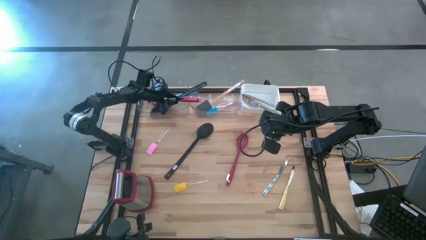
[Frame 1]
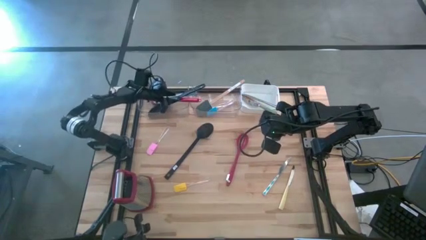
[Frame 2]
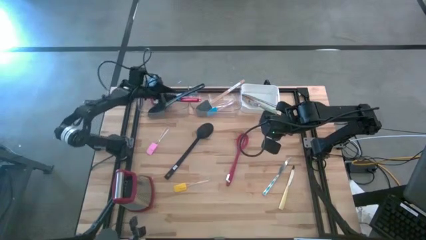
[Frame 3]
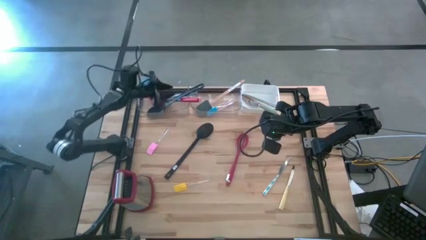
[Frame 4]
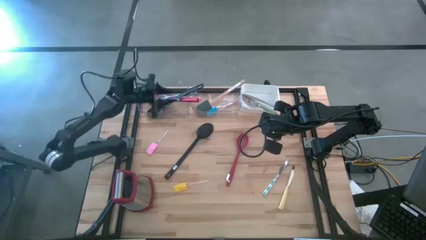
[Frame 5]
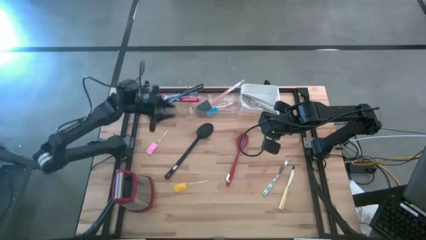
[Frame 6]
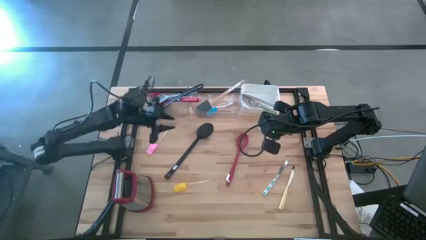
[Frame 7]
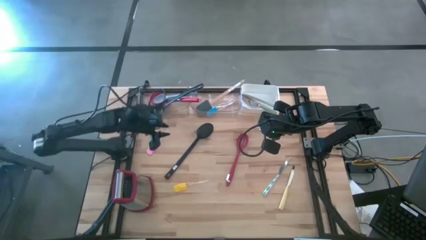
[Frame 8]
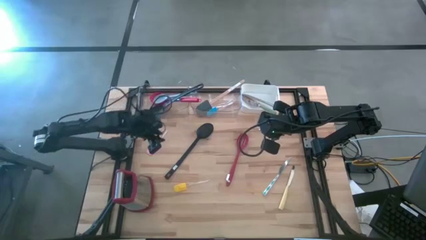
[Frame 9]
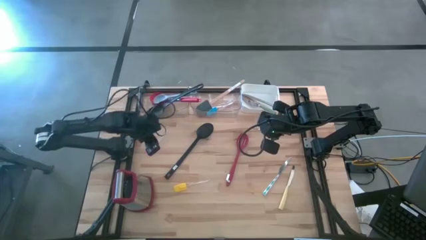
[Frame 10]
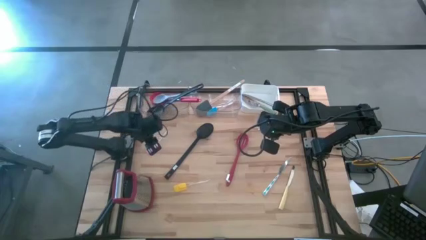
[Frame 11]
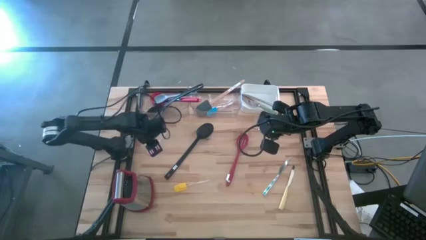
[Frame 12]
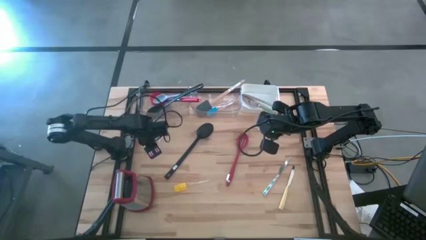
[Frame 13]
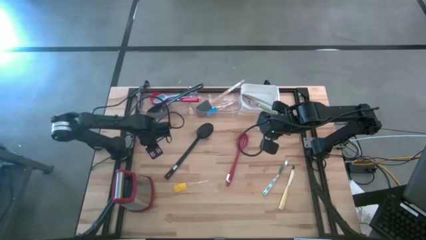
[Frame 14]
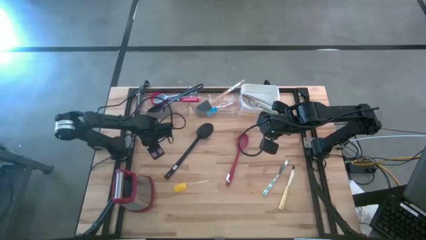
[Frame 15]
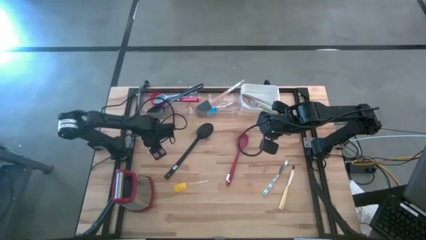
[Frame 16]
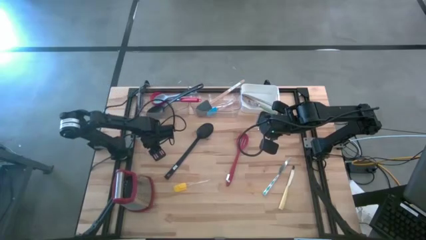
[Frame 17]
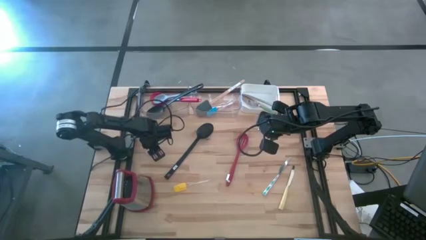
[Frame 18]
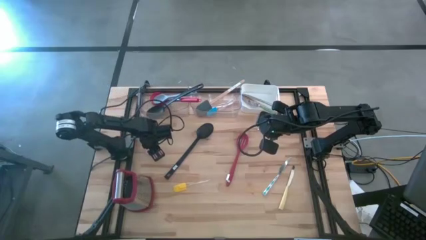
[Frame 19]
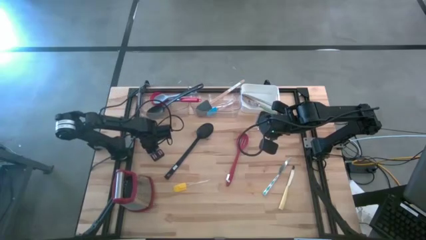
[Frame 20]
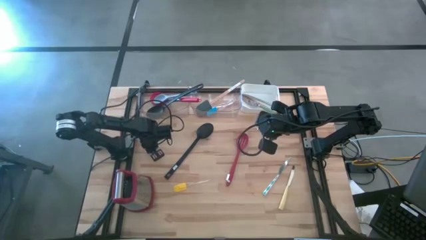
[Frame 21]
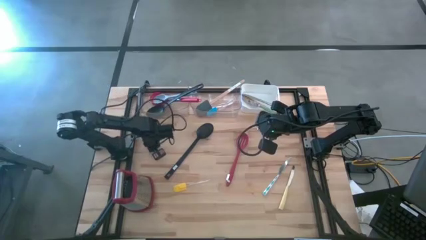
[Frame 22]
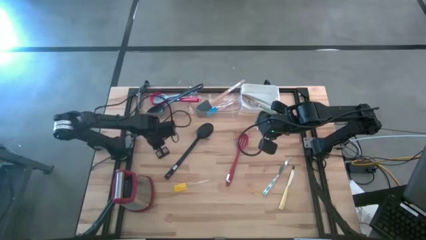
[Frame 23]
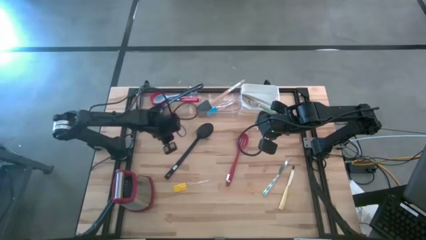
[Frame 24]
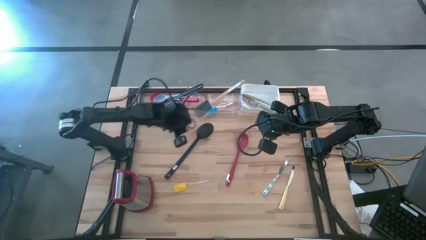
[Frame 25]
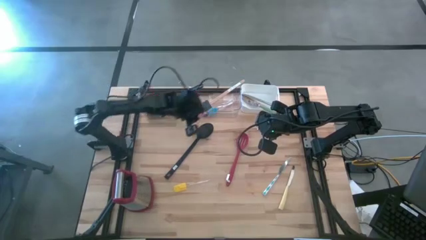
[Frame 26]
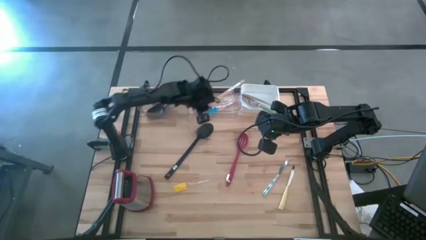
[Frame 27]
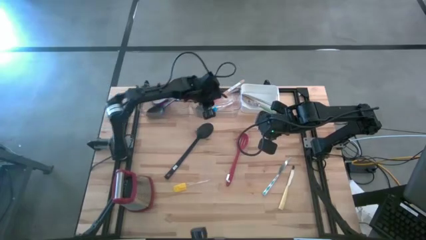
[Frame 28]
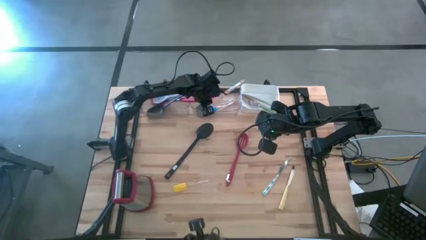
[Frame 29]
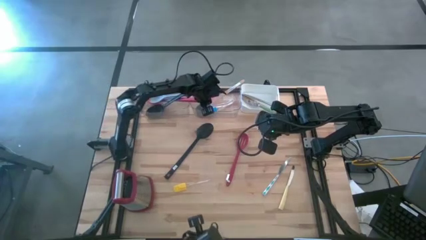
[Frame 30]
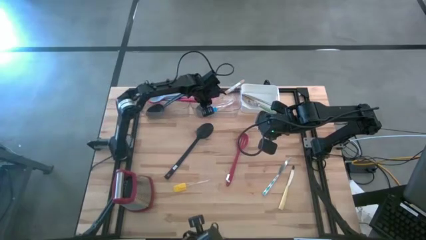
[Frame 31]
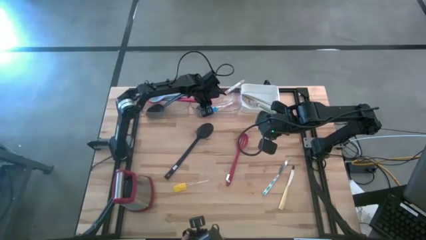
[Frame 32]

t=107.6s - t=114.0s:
Task: Pick & Place Kitchen Items
Put the pink spatula into right transparent bin

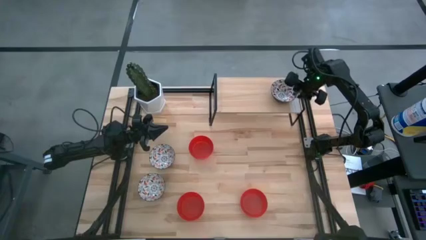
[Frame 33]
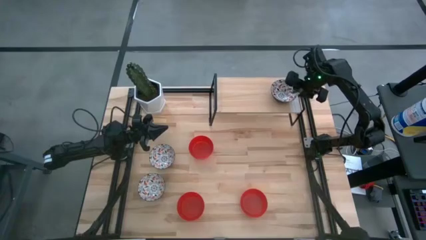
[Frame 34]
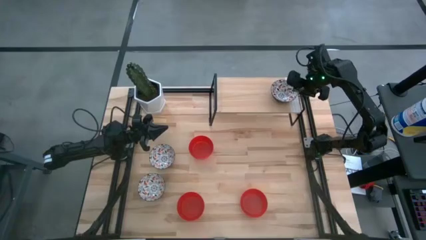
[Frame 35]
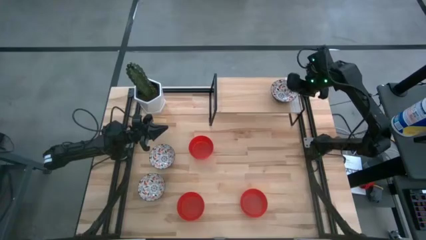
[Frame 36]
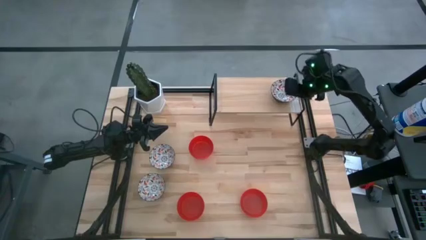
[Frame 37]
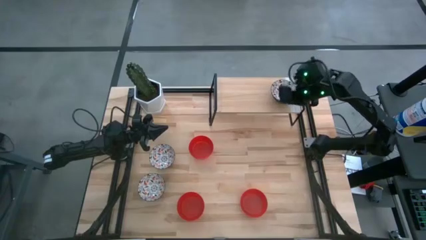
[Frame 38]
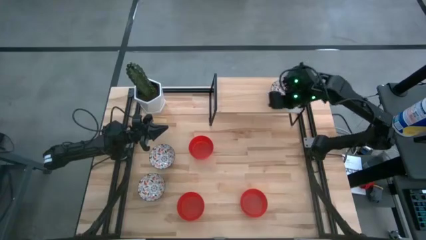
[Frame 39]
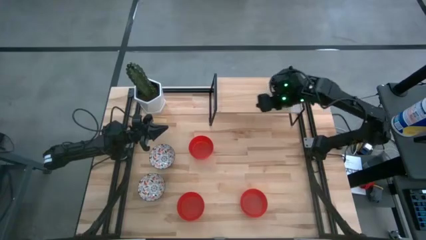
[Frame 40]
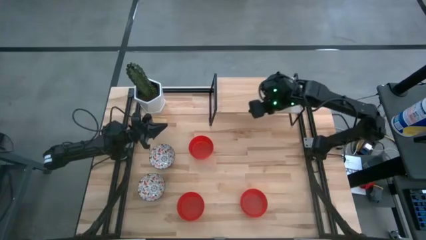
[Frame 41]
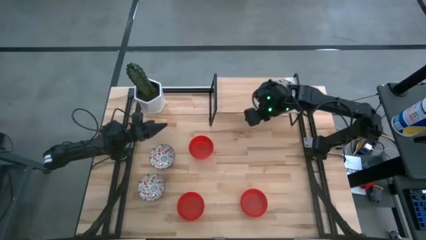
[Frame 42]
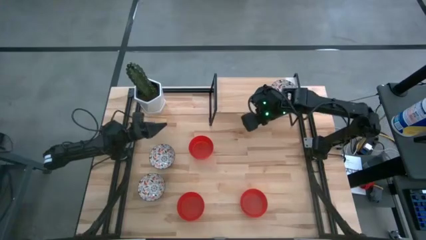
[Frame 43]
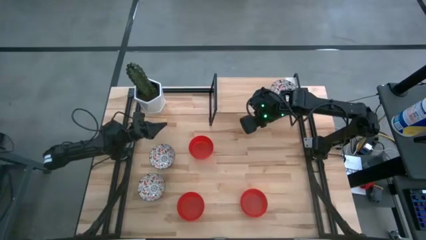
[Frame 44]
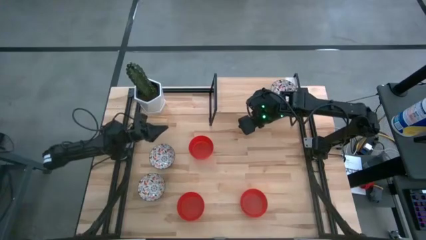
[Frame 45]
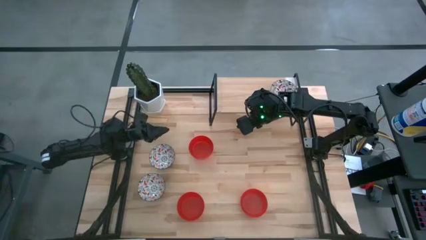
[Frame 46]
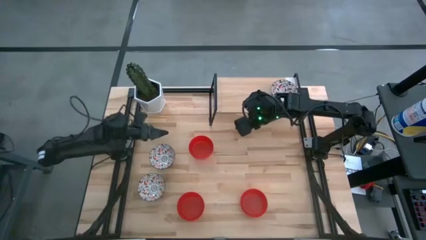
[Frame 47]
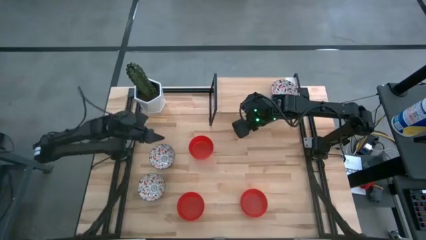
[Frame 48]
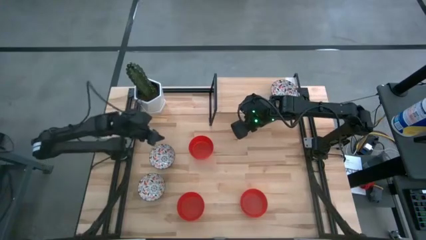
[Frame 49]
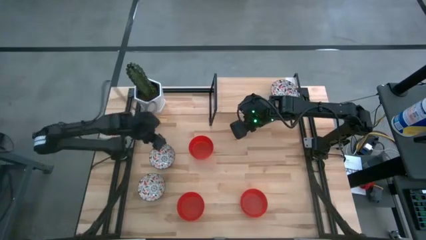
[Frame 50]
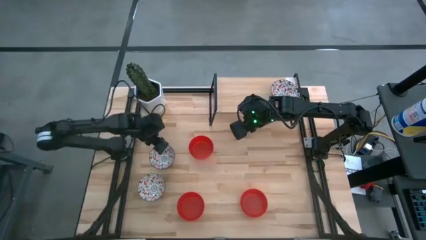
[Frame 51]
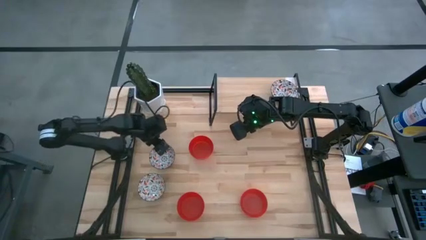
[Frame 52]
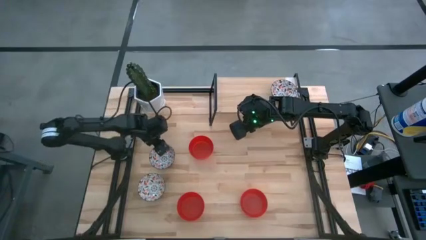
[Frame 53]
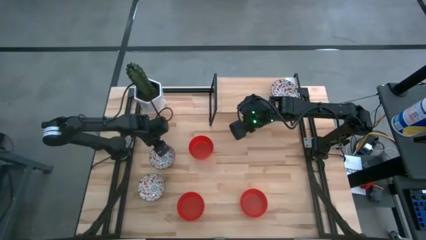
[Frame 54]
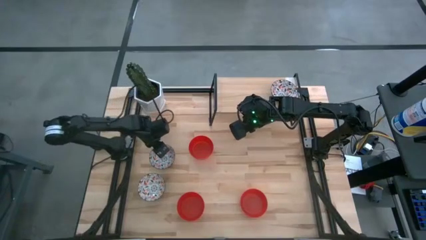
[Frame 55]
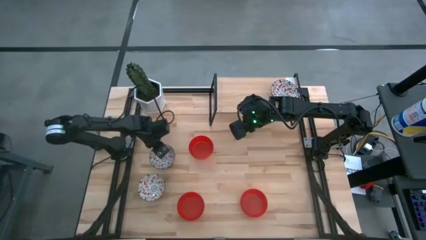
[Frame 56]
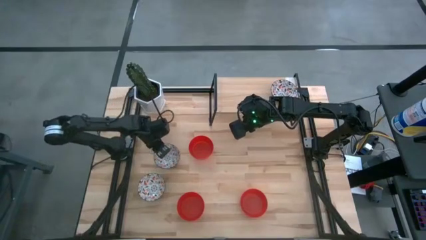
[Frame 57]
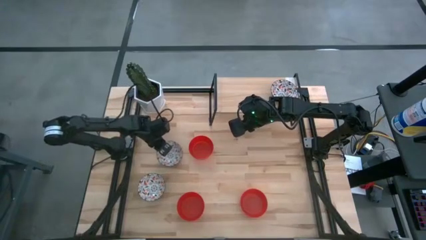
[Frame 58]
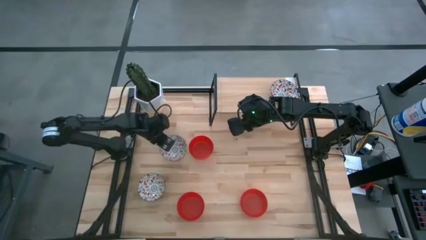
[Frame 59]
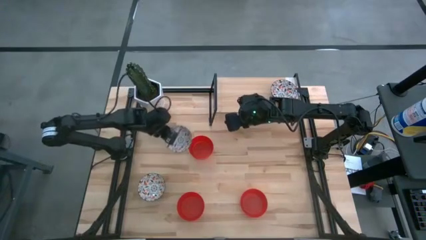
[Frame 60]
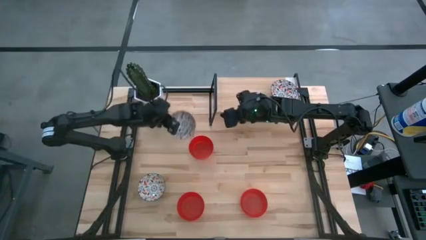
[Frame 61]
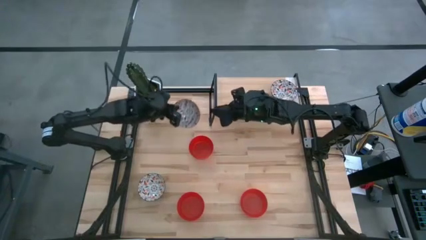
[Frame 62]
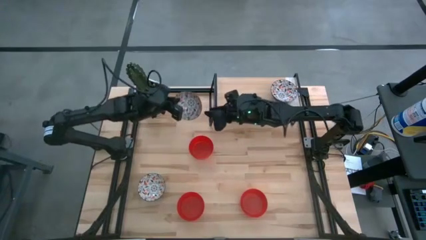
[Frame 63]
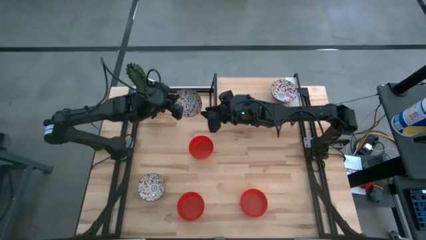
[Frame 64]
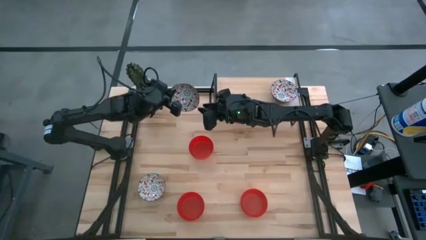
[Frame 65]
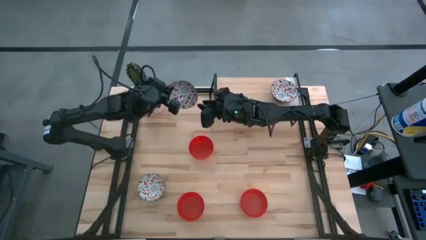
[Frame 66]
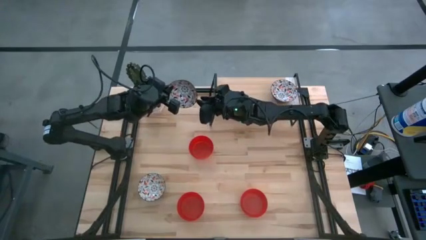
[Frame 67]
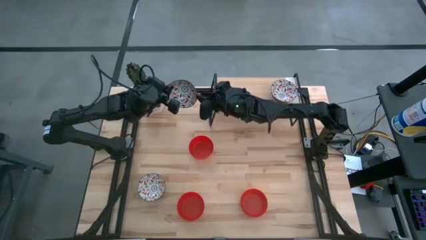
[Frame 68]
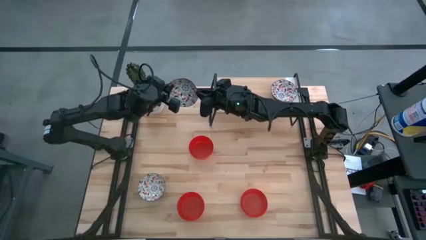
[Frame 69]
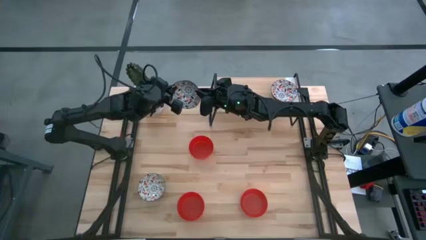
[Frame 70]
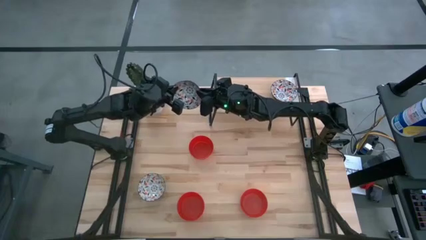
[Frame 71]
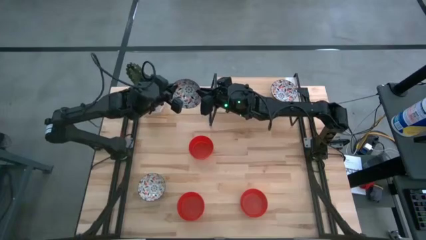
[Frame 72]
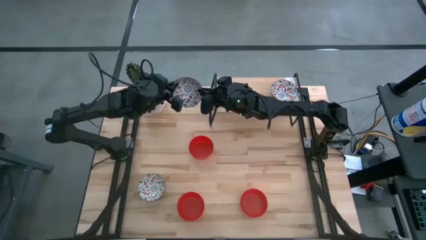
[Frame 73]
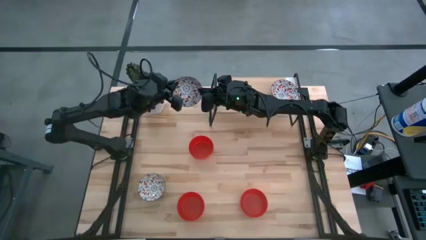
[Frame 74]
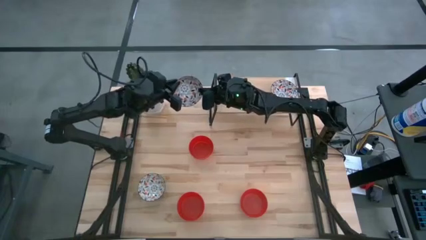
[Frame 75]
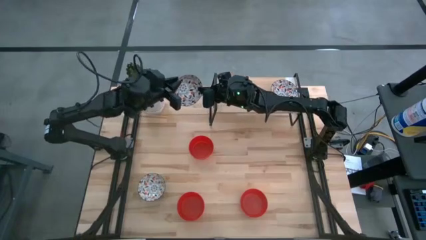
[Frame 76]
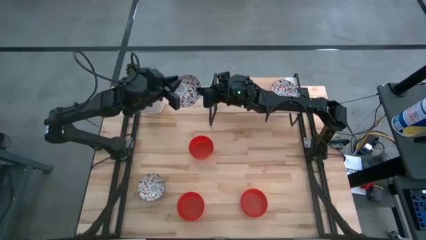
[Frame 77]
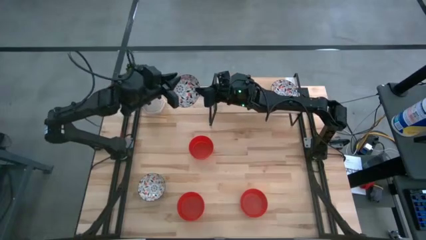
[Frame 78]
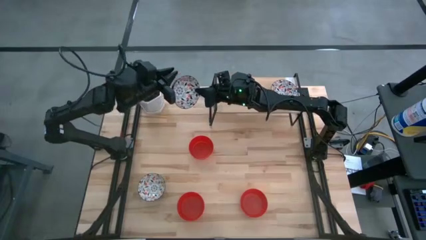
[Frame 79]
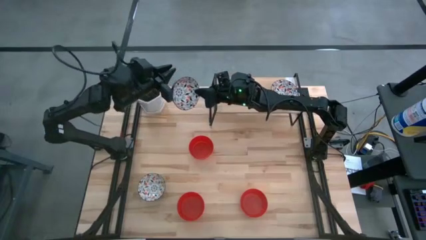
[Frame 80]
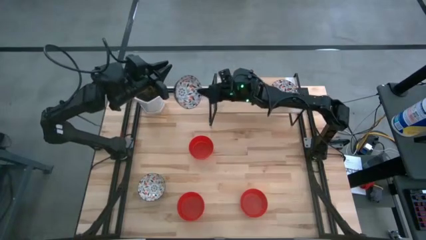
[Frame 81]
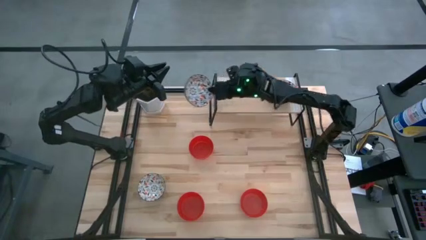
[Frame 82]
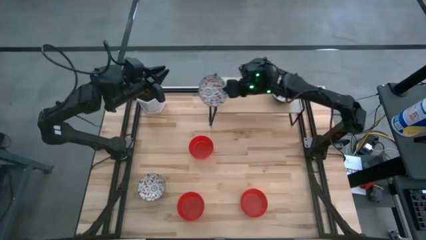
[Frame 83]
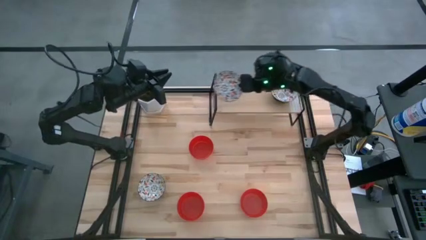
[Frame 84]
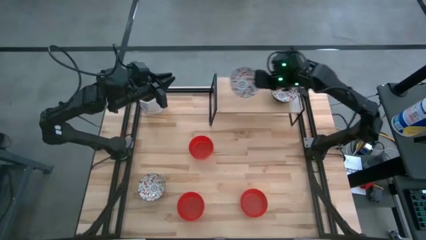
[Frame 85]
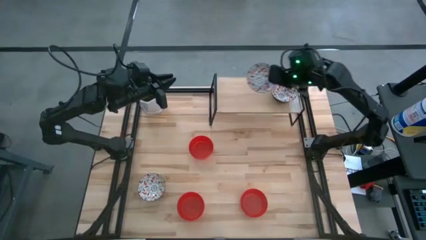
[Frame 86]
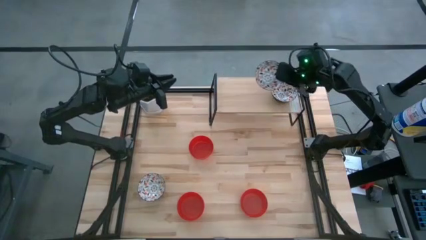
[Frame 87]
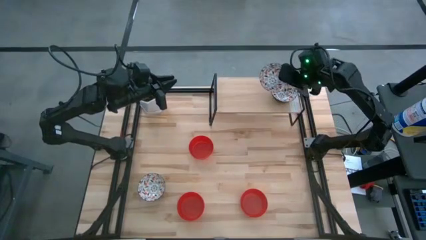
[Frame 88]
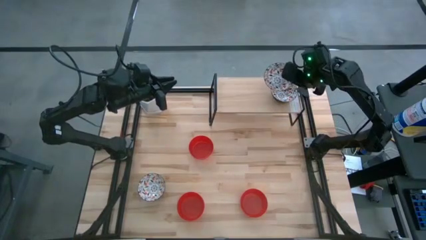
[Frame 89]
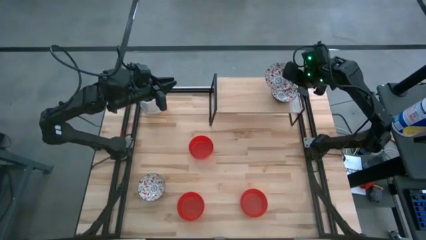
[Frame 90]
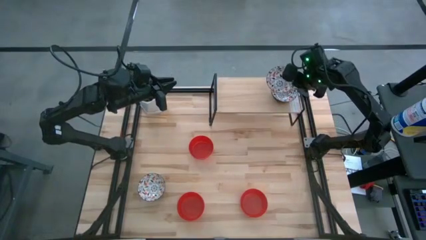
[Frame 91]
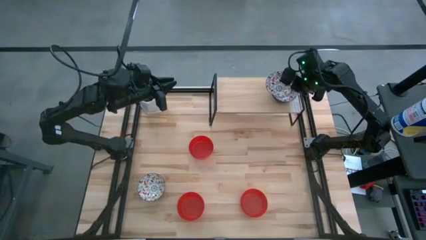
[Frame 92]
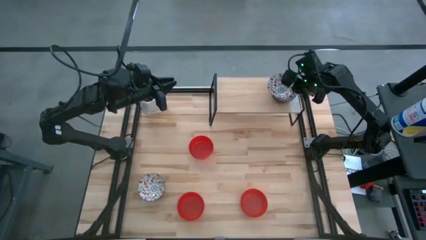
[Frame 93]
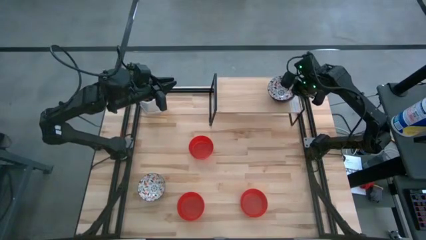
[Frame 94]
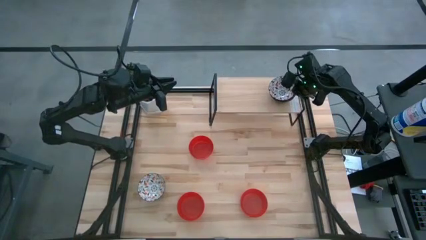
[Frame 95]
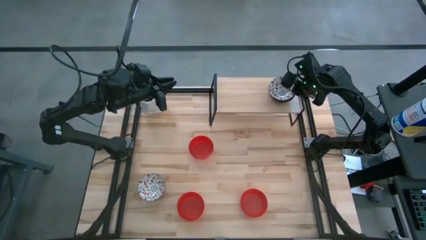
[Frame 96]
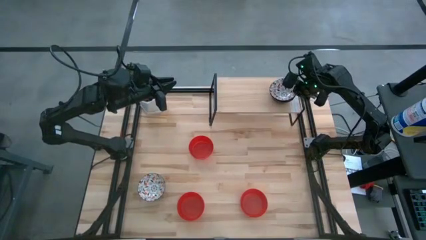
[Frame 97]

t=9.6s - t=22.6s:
Task: Pick & Place Mini bowls
Stack the top white bowl on the white bowl on the shelf
